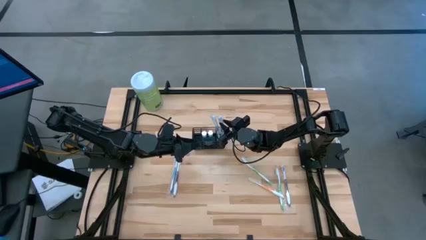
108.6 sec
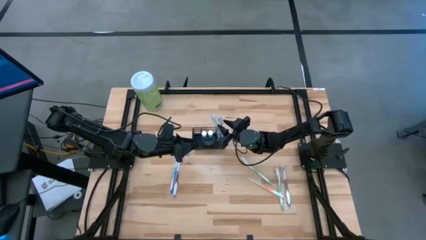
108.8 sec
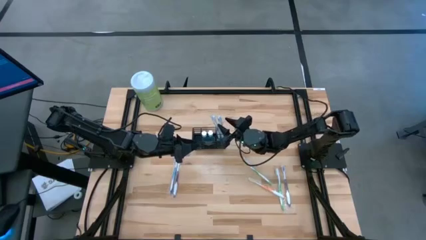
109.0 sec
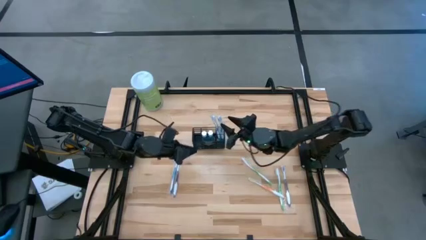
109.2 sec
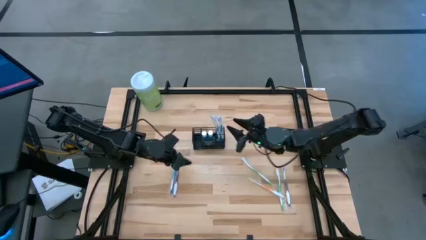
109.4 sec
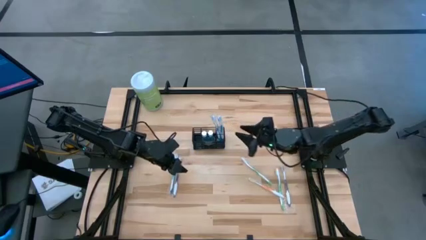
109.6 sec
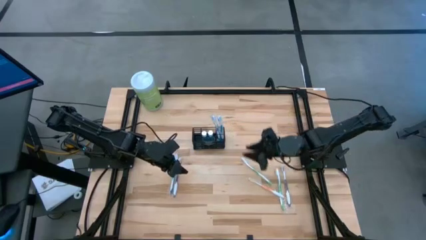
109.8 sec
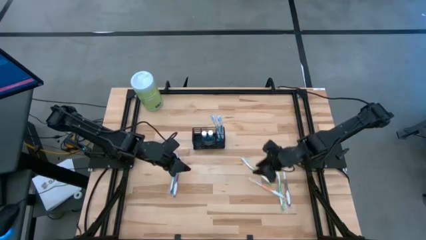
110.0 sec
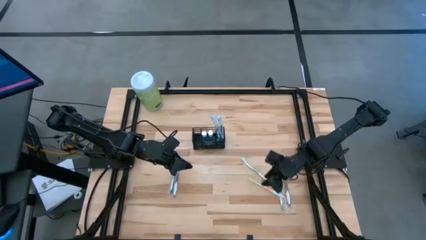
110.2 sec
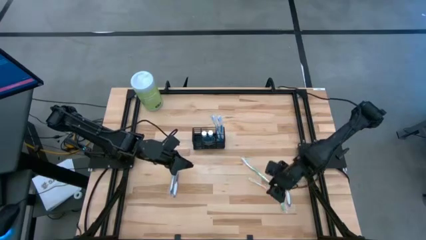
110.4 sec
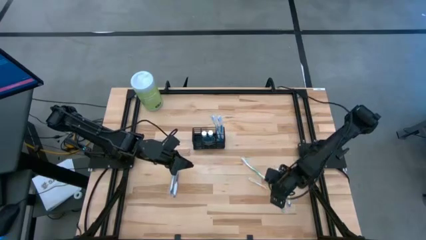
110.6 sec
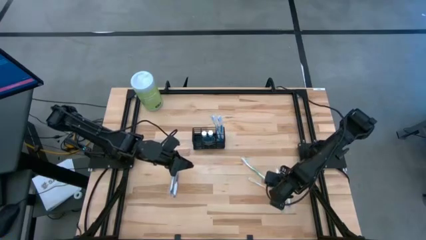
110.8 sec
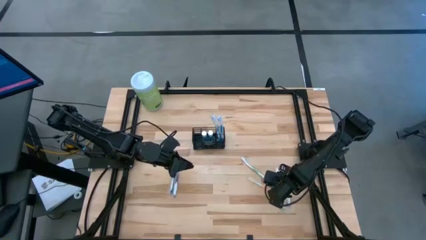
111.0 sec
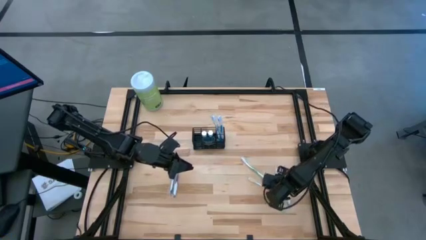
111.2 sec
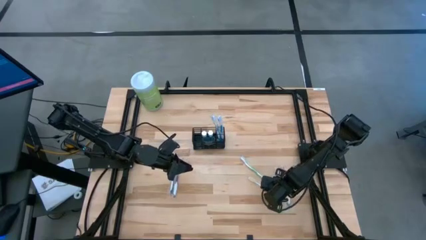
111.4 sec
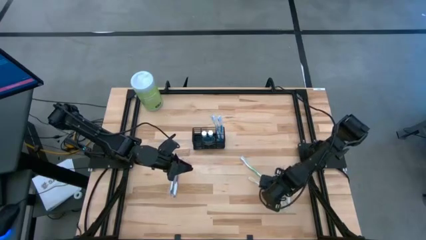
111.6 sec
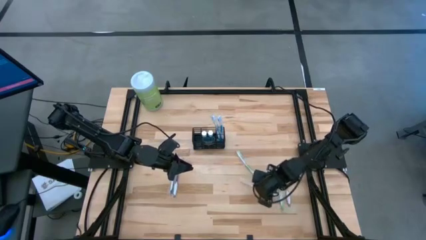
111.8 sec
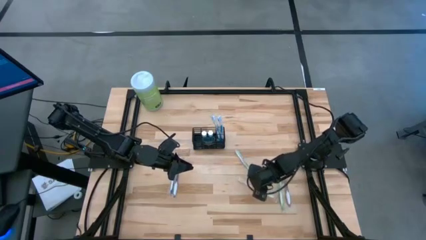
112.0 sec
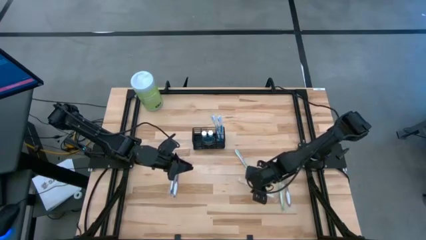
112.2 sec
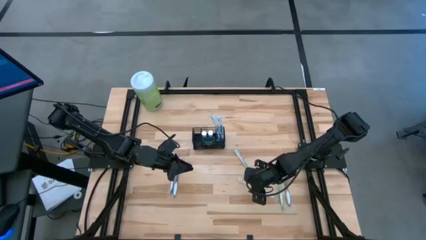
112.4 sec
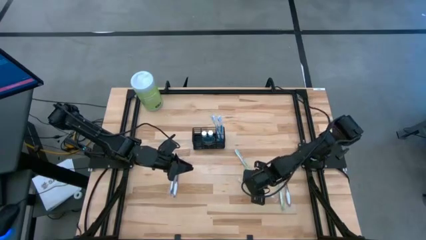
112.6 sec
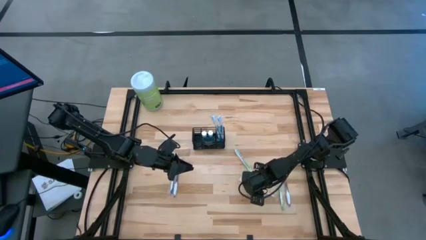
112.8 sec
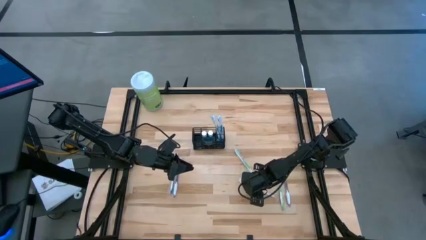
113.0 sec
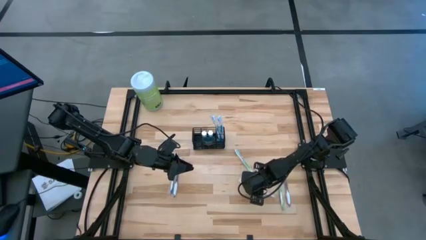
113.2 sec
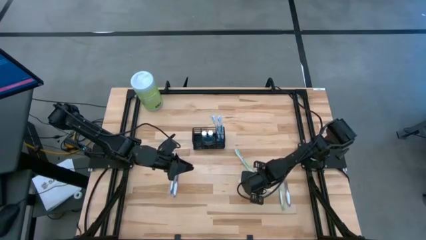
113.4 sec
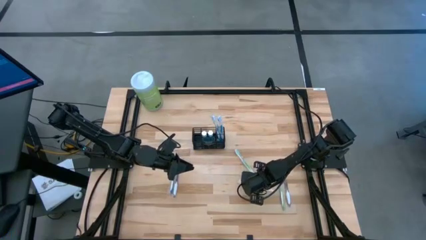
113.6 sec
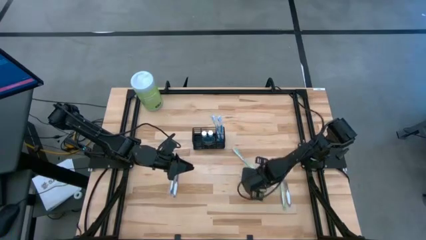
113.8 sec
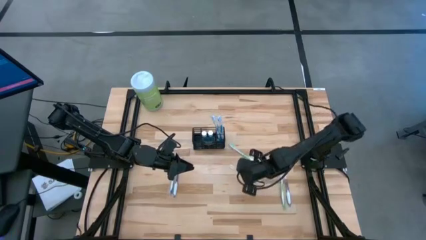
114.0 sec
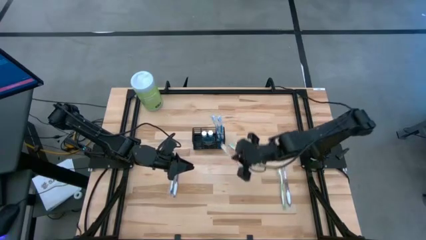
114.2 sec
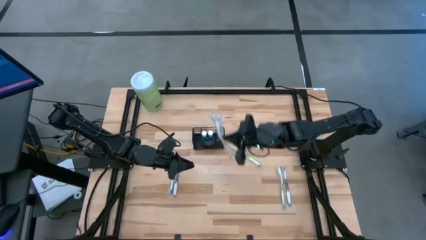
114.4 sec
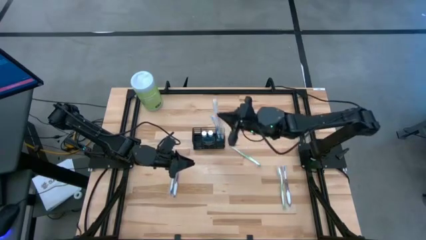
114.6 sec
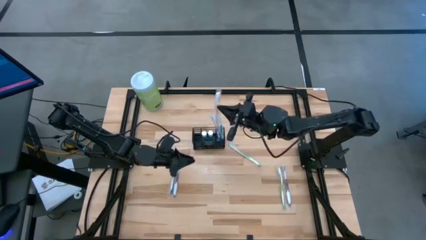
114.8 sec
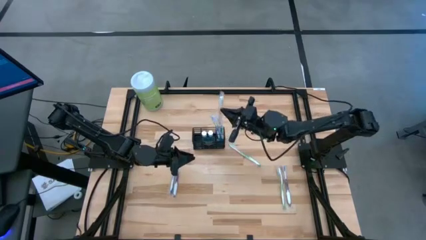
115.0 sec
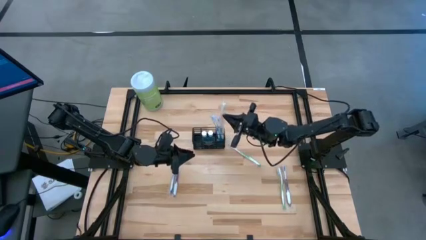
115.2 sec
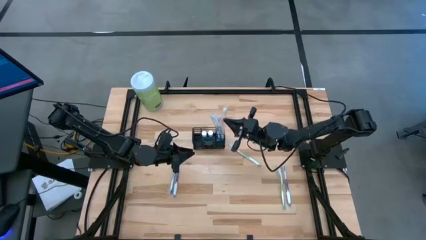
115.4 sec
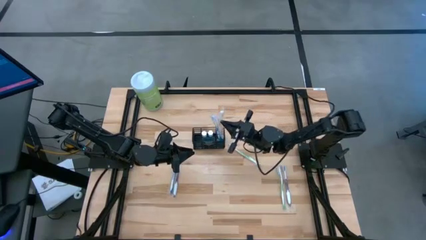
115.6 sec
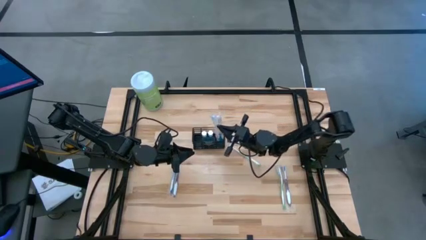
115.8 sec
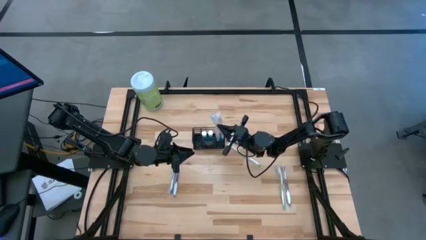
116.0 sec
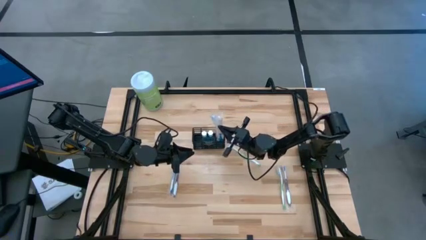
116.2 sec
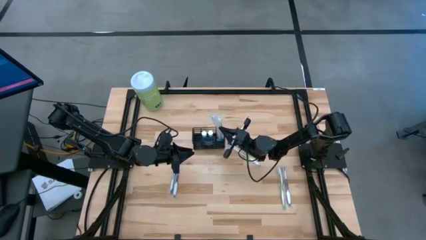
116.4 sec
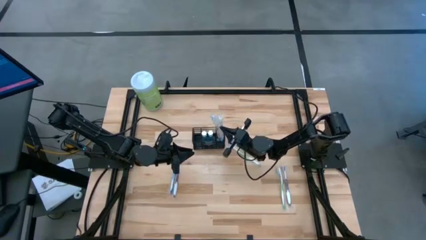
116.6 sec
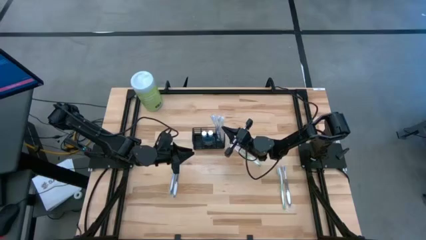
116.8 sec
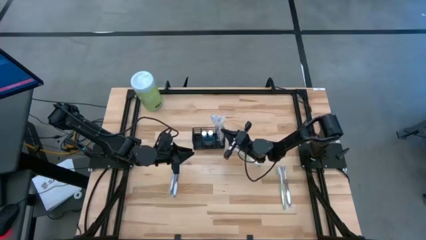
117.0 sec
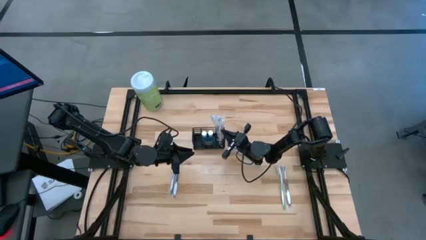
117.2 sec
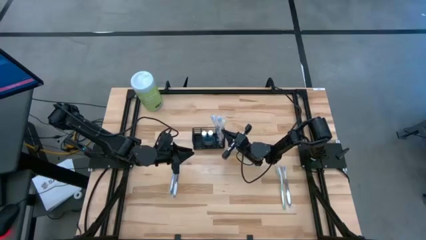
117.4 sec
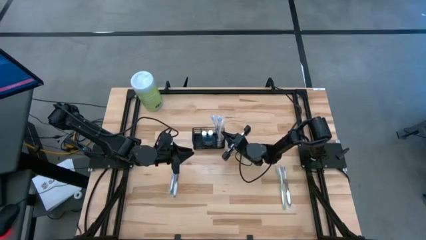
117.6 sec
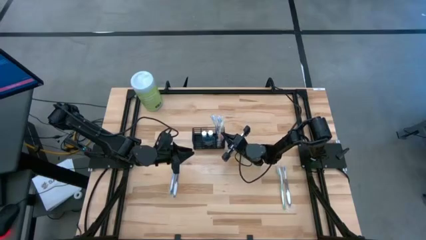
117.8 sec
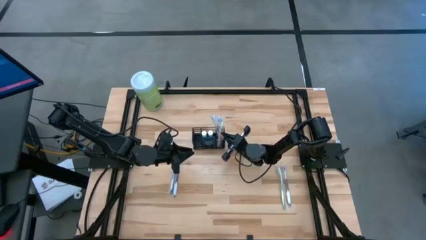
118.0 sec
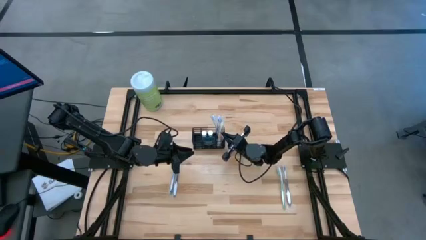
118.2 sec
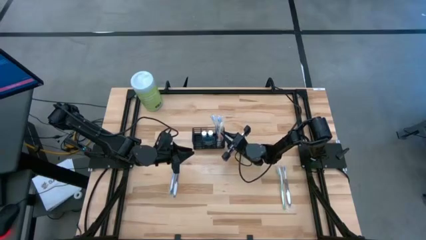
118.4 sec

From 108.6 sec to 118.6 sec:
Task: Pick & Place toothbrushing station
Put the orange toothbrush into the black mesh organizer

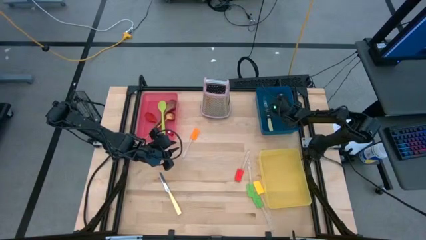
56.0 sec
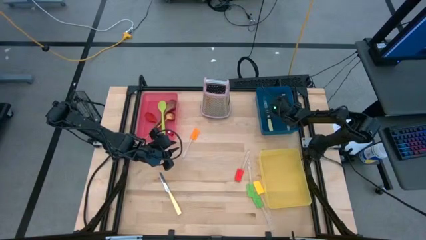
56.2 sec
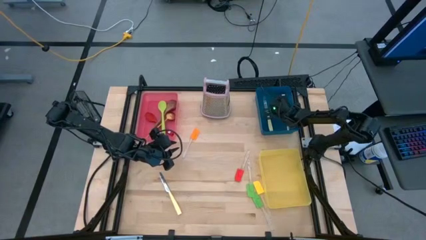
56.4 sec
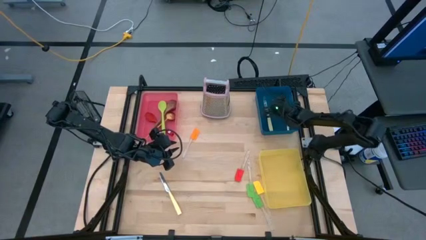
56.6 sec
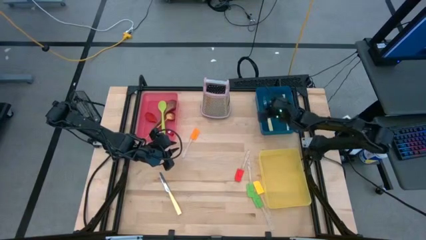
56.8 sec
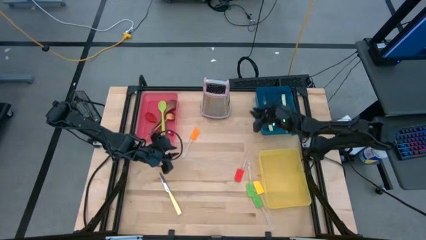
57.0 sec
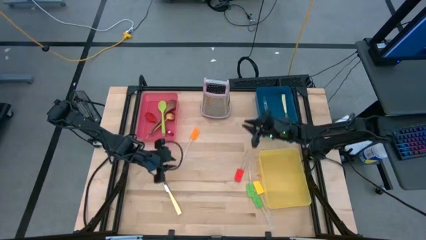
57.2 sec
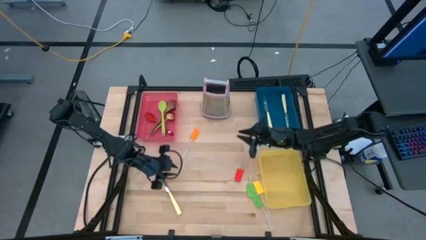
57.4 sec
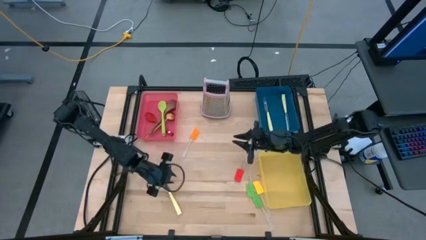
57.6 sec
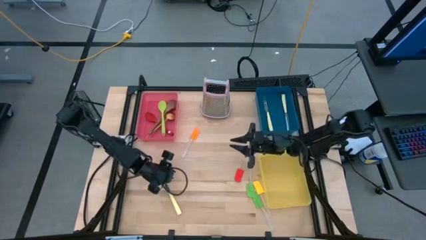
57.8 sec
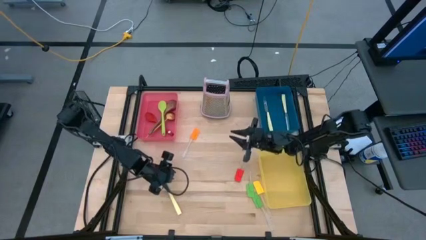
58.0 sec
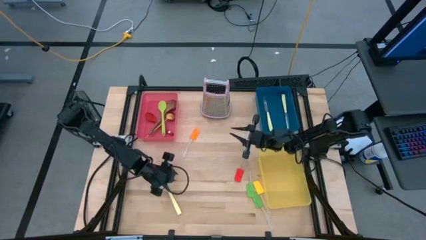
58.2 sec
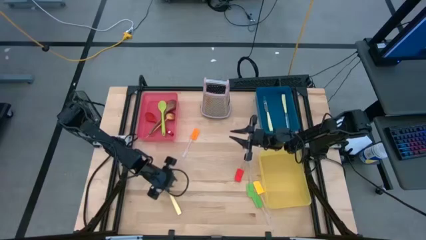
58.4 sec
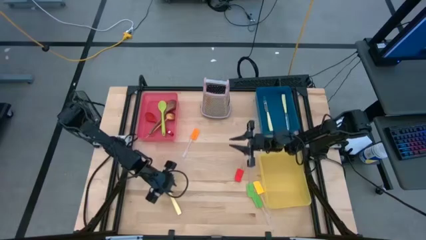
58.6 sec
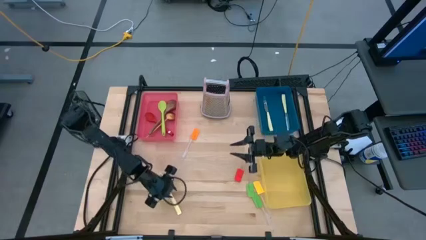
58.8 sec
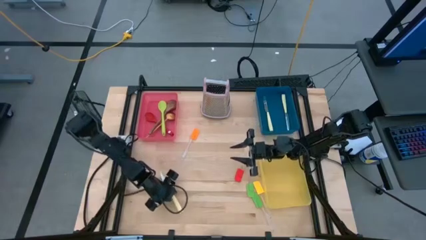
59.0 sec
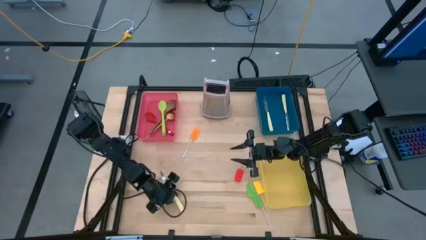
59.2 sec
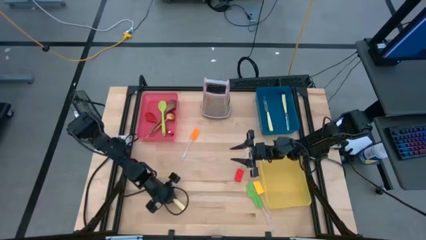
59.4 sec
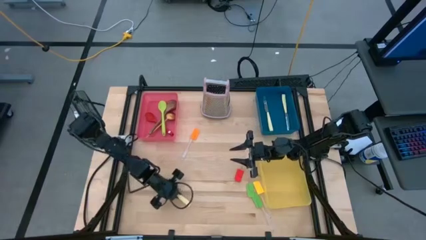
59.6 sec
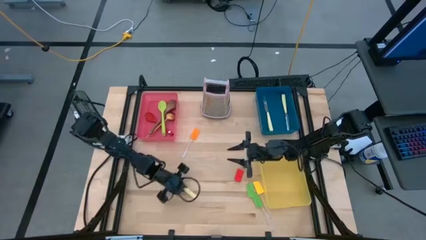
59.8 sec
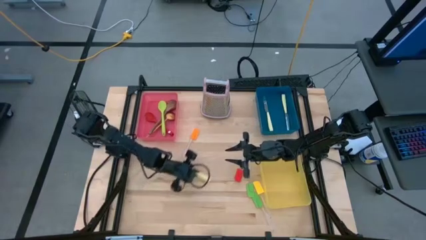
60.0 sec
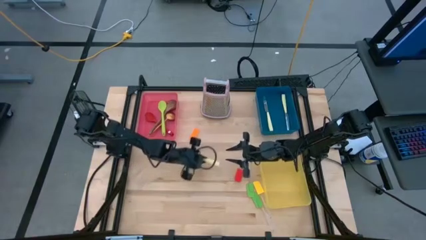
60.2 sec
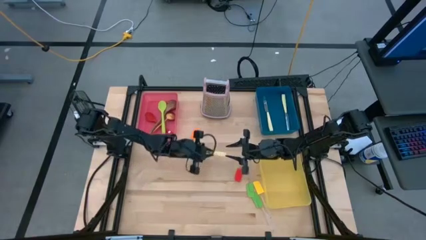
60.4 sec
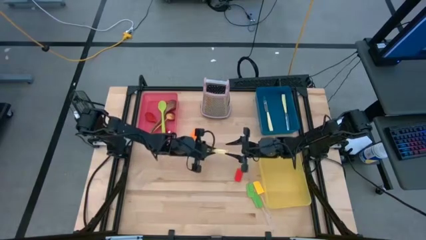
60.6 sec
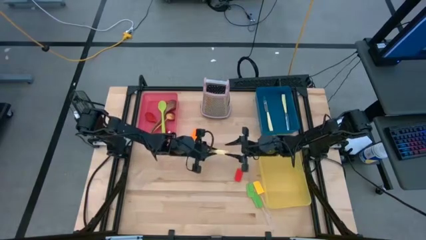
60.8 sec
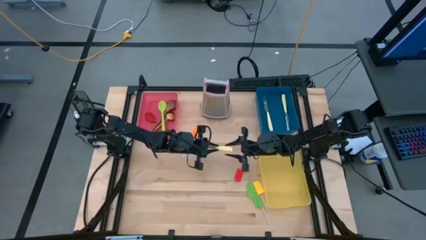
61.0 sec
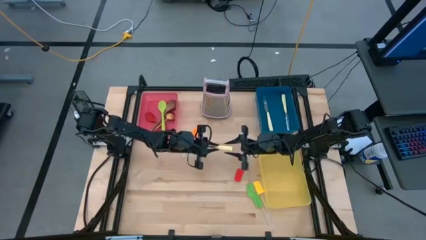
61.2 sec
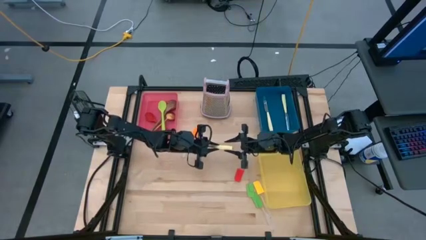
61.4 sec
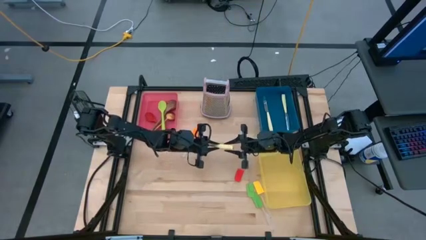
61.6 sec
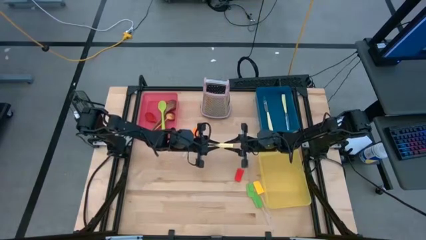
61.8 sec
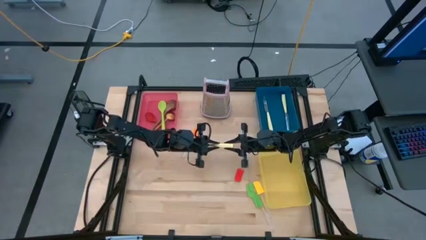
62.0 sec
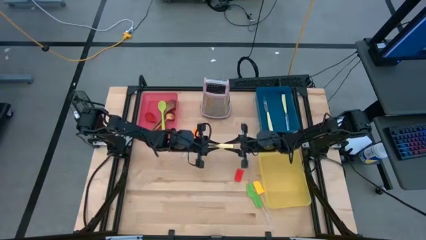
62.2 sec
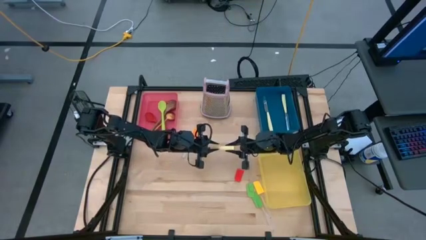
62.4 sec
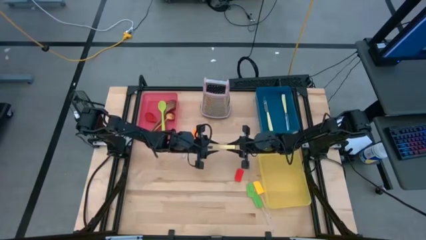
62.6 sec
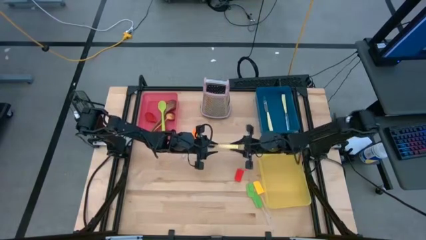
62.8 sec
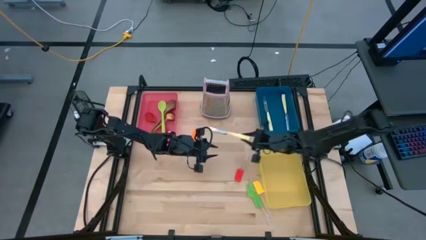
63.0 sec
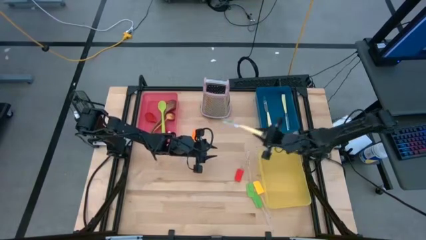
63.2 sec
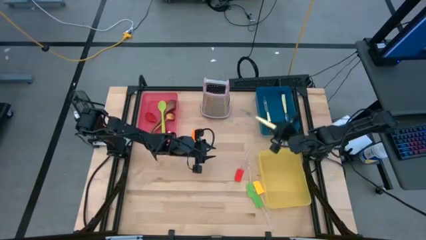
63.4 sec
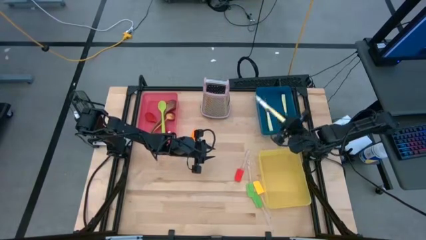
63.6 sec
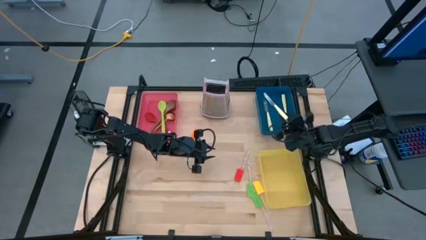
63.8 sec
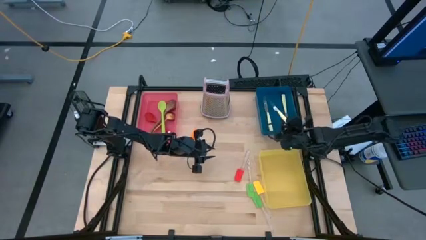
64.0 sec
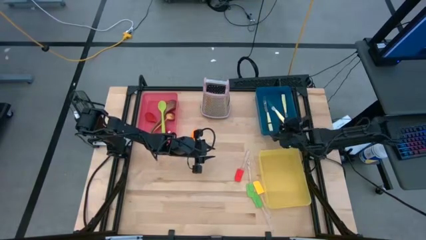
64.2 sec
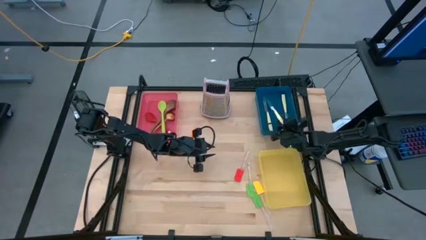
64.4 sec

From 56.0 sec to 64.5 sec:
Task: Pick & Place Kitchen Items
Put the yellow knife into the blue bin
